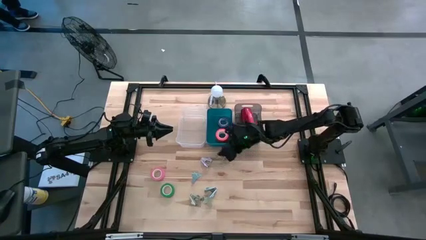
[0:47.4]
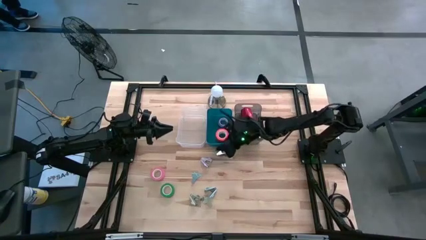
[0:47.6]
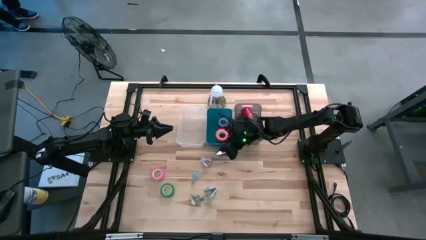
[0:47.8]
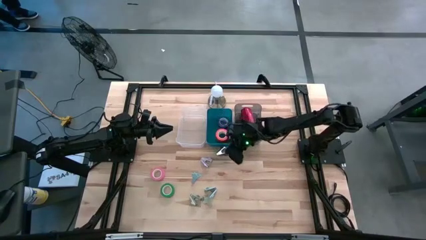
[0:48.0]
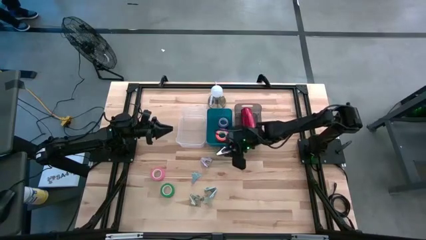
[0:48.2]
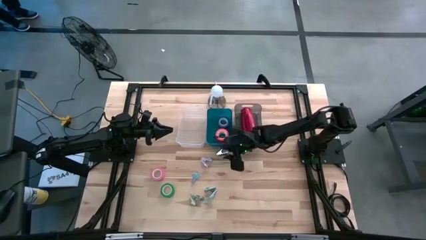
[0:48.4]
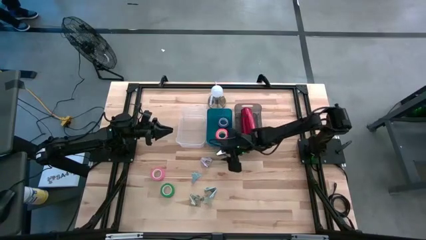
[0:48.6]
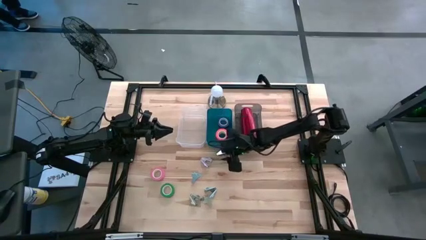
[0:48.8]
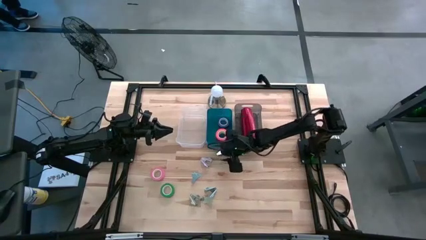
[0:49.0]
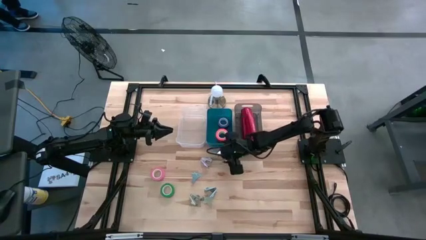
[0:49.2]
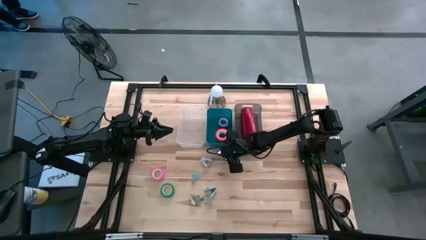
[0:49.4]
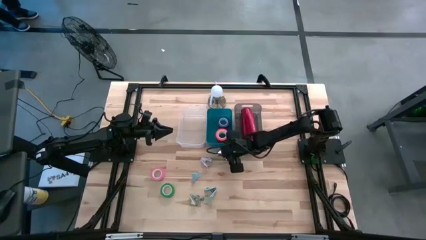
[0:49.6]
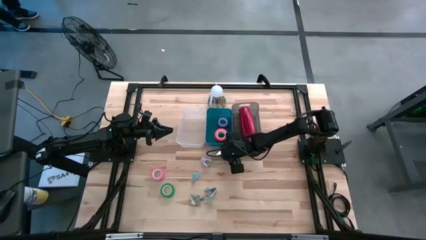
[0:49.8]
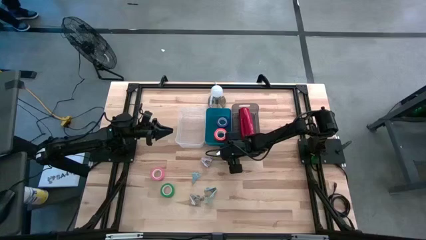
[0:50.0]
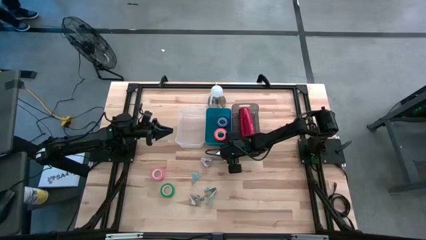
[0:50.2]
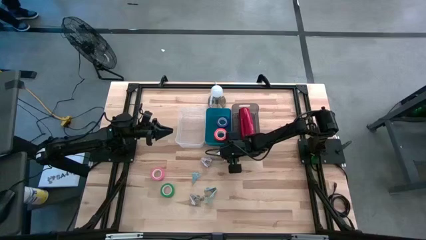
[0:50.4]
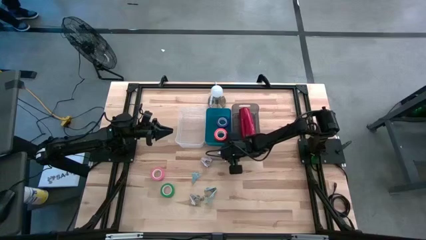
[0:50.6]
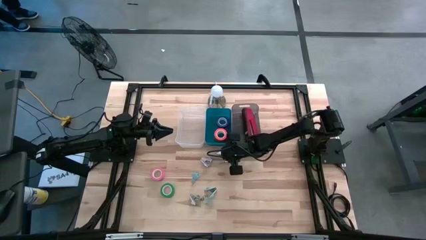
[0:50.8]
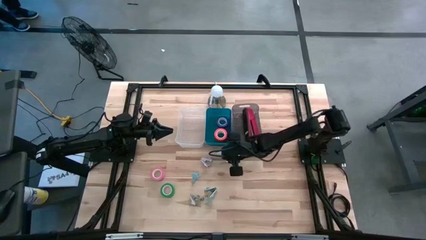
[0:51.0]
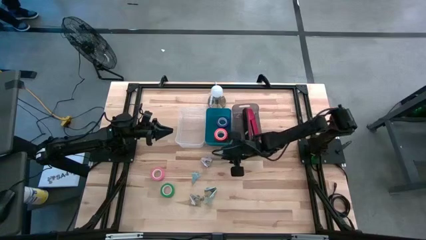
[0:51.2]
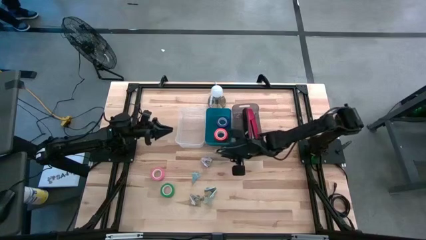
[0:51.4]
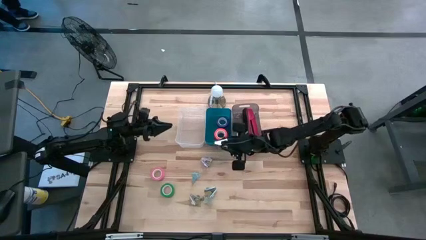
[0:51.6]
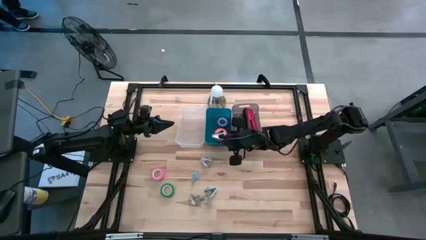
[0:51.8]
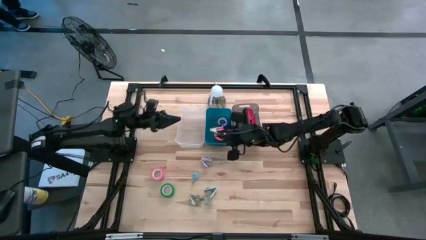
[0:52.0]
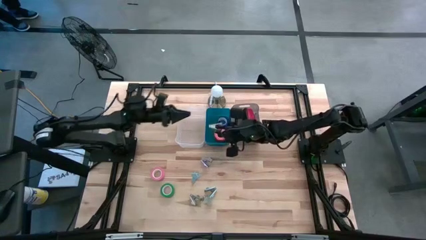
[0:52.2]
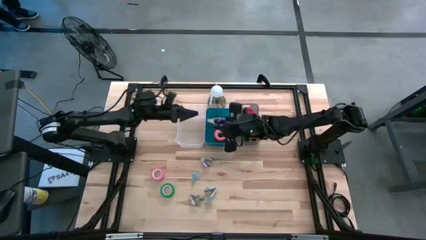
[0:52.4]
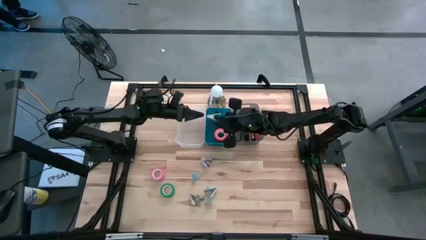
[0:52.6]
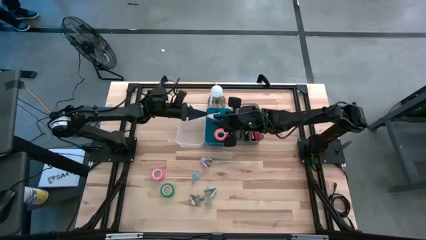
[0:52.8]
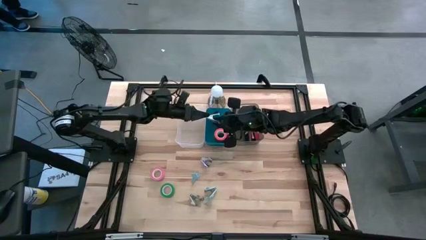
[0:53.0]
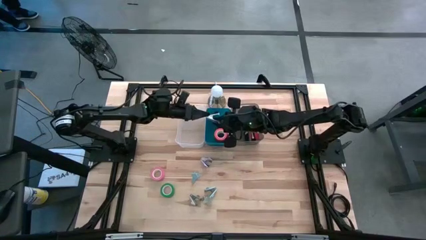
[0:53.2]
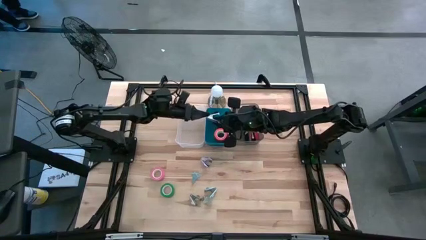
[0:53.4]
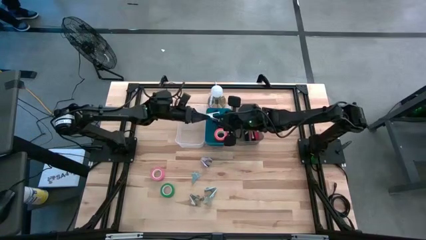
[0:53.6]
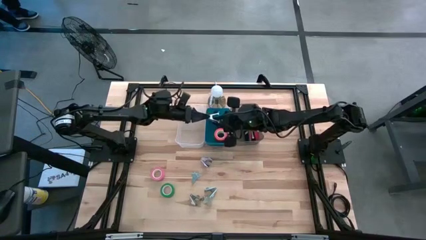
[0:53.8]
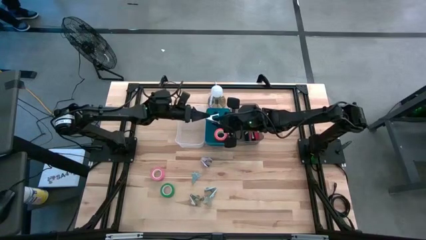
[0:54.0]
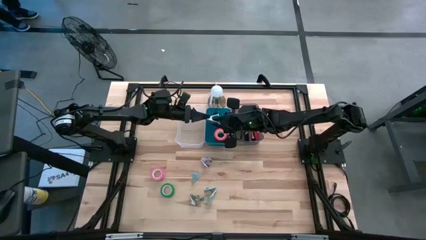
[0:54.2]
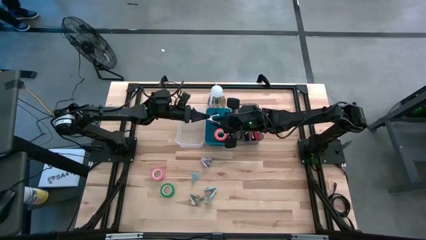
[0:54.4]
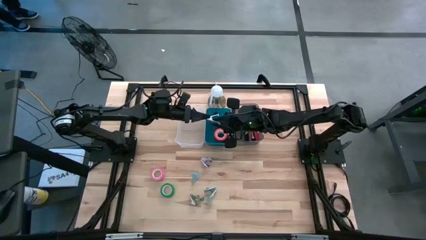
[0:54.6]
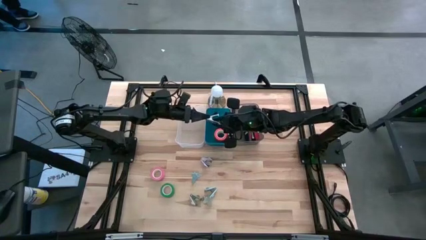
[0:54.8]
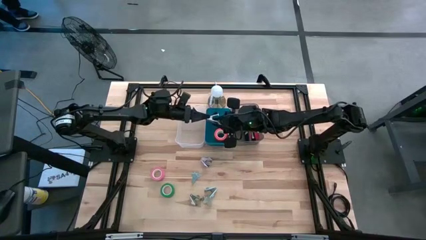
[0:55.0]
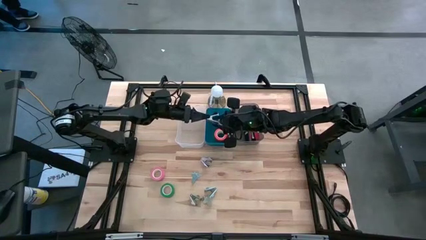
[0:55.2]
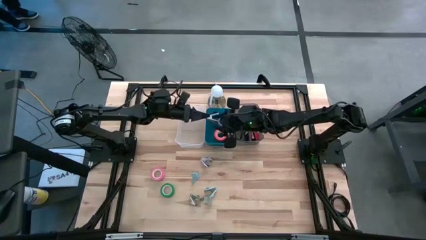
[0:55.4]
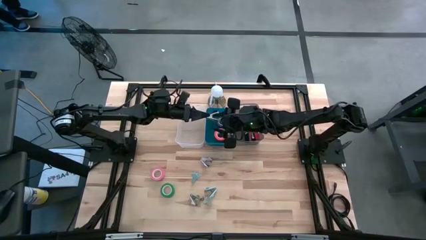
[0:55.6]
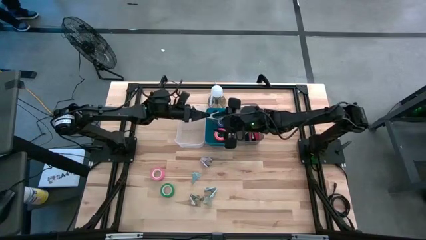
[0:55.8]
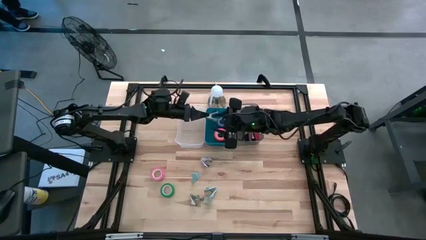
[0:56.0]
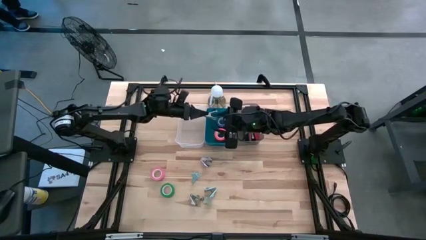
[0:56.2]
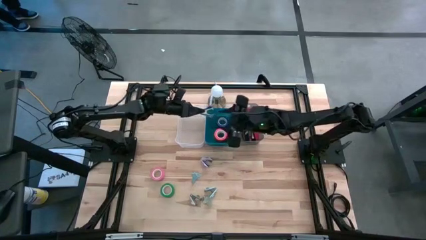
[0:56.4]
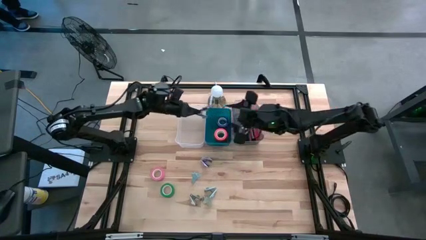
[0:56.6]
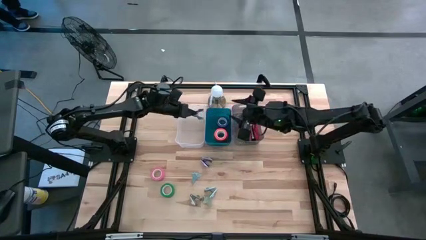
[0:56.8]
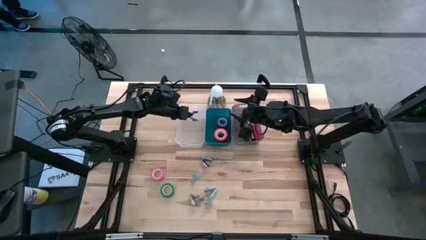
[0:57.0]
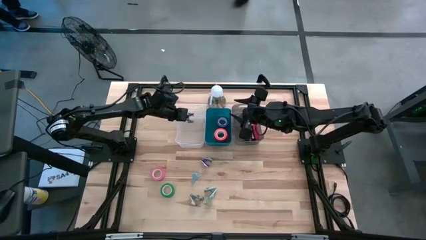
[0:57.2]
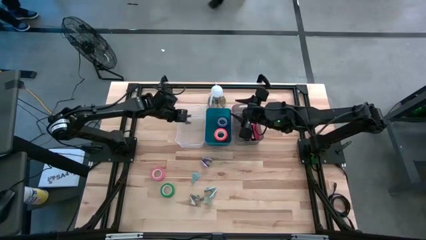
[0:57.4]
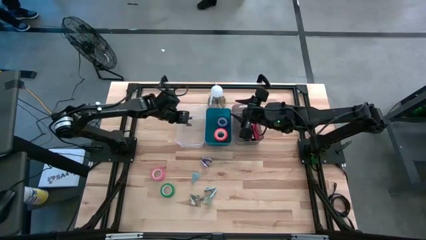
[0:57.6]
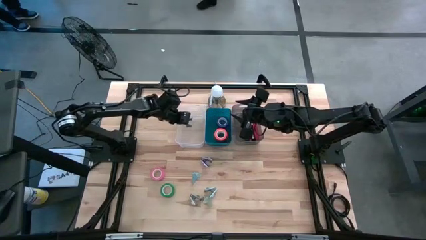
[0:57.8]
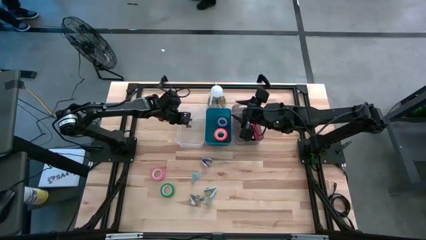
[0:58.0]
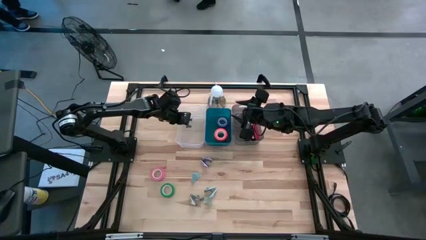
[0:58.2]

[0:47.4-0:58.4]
Task: Pick and place Stapler, Stapler remover, tape
Put the black staple remover into the transparent bin

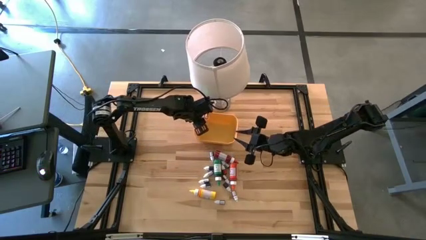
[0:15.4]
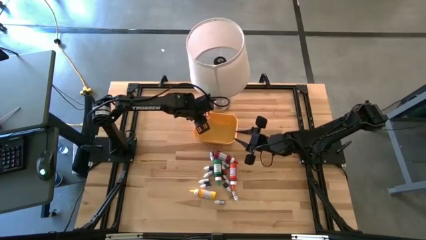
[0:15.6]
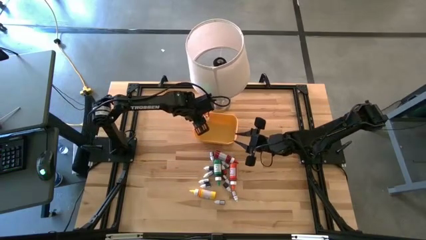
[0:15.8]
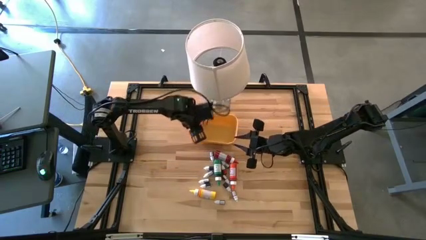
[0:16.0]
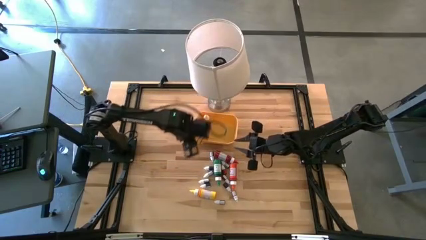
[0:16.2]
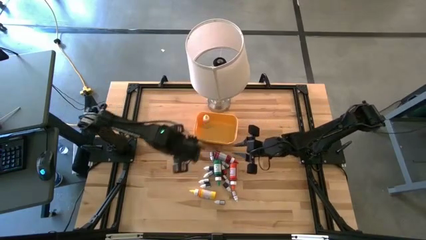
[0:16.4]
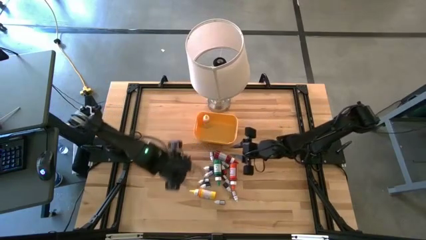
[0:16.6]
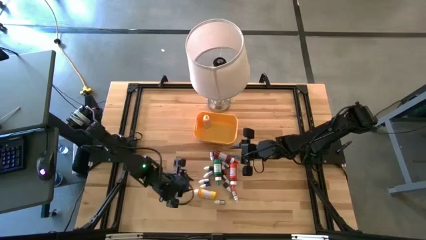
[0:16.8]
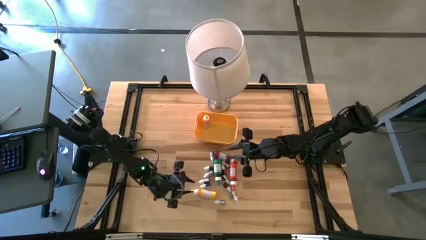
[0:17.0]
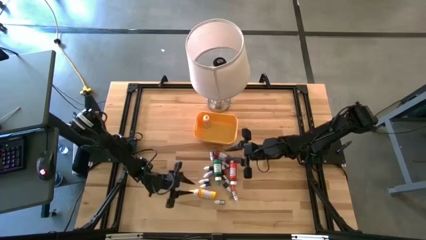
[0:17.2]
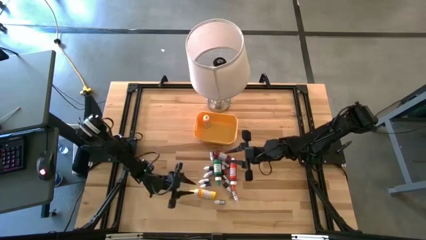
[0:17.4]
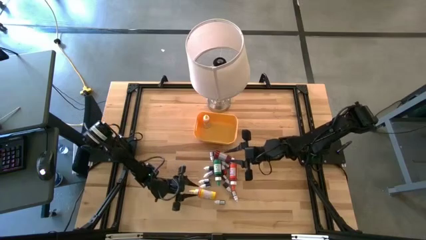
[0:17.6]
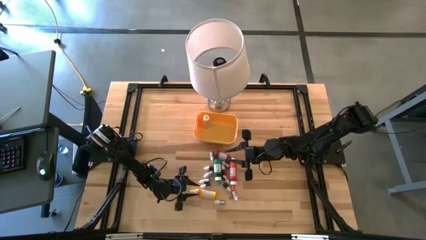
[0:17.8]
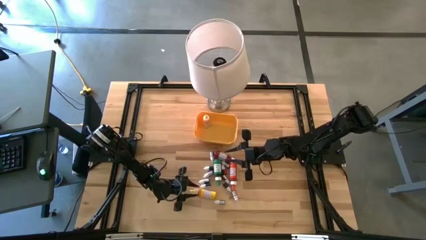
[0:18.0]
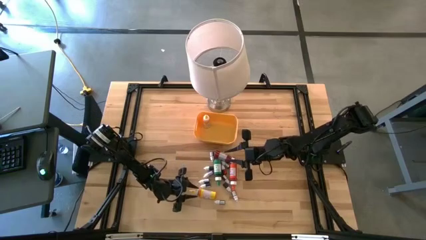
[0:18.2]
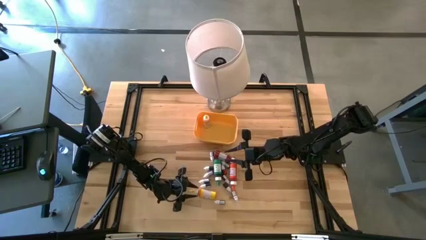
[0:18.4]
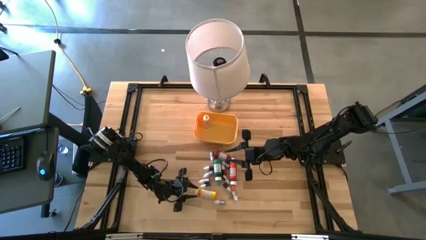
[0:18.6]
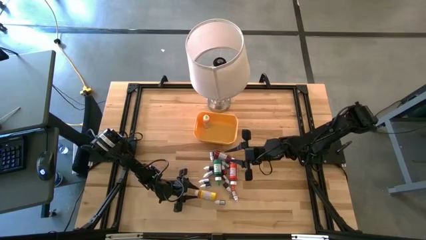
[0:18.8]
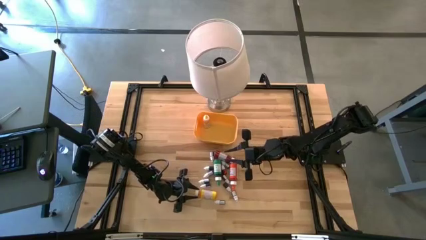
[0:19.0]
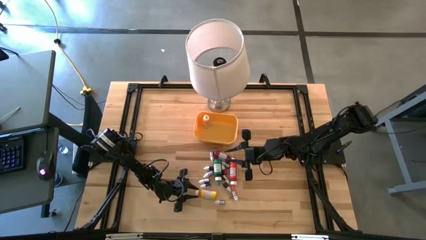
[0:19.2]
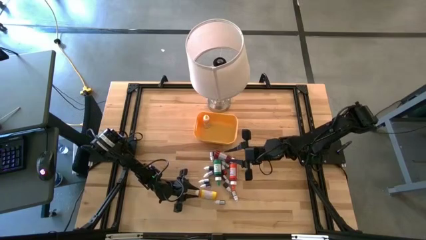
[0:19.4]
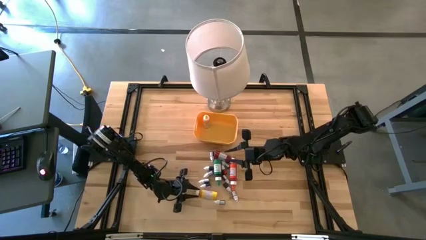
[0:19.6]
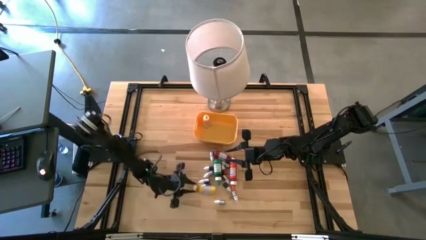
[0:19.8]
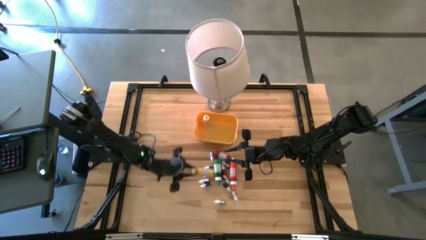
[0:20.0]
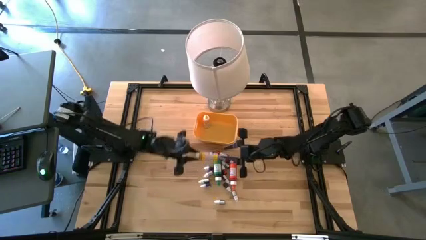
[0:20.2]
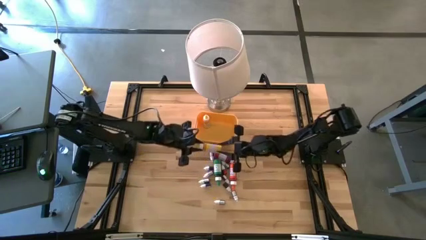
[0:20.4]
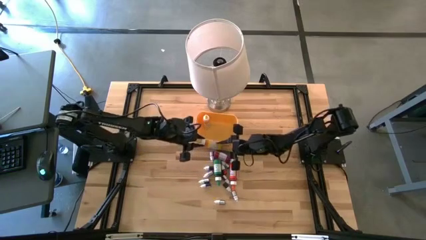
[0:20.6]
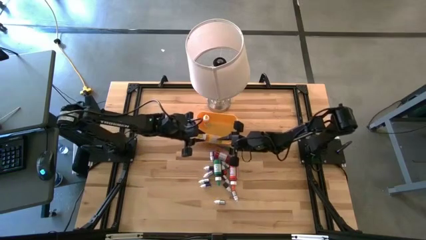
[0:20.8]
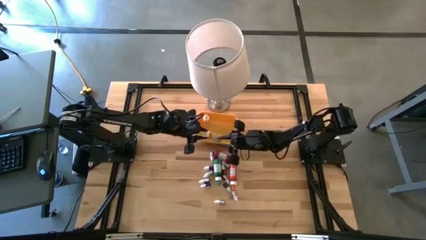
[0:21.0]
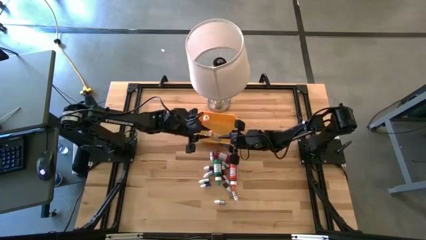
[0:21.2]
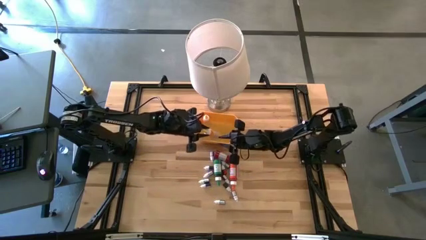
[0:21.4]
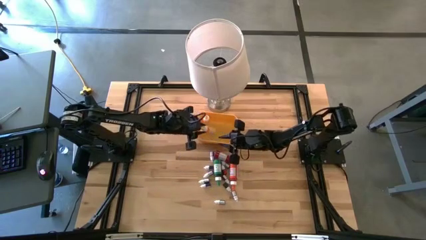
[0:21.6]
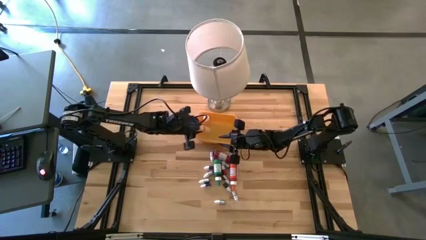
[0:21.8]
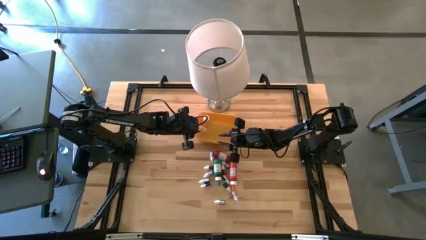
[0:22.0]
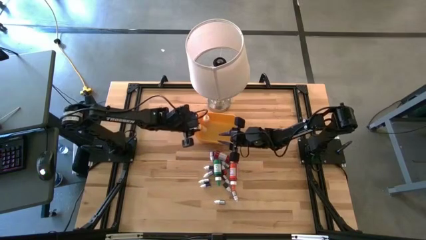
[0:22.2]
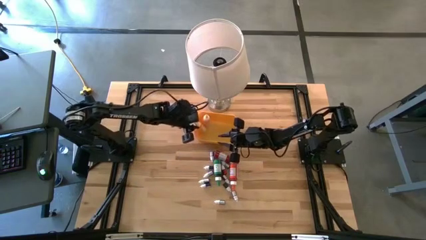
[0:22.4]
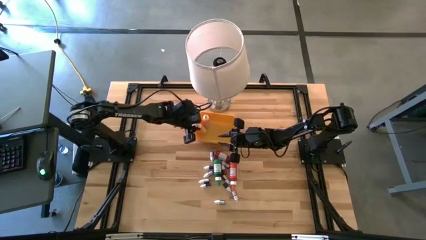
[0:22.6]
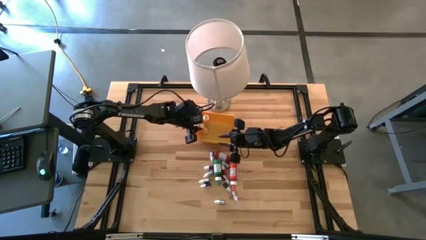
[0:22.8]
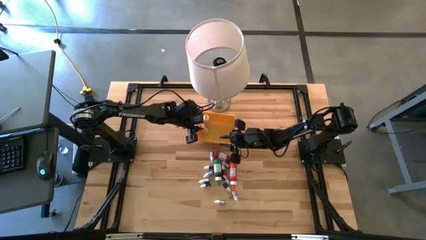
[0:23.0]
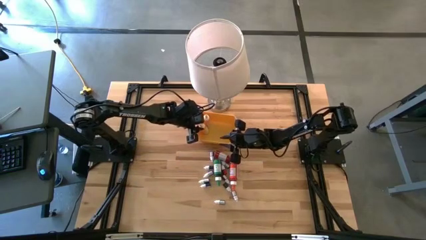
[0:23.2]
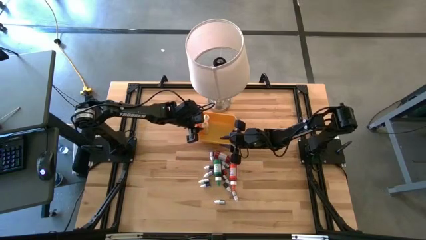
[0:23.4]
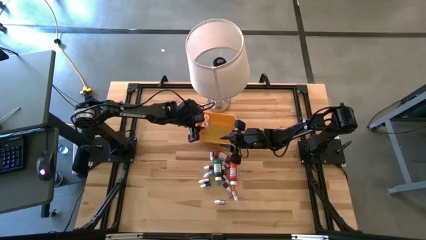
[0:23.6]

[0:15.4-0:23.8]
Task: Pick & Place food coloring
Put the yellow food coloring bottle into the yellow bin
